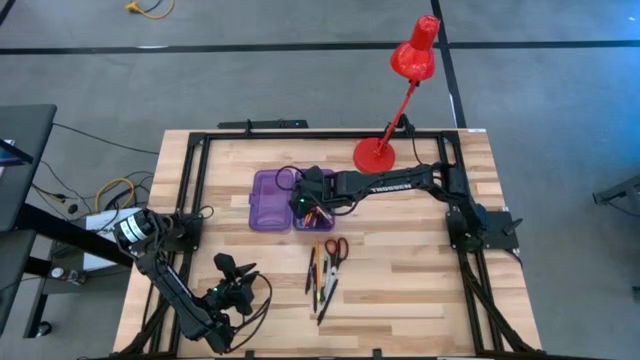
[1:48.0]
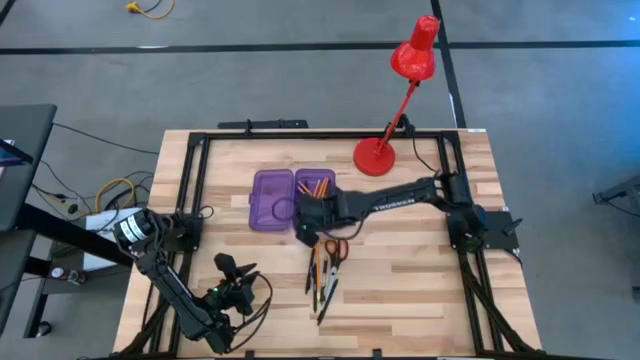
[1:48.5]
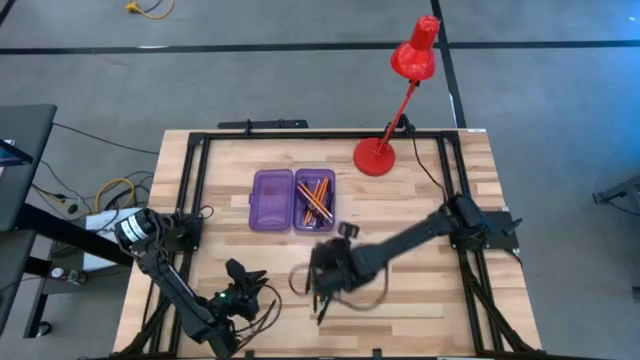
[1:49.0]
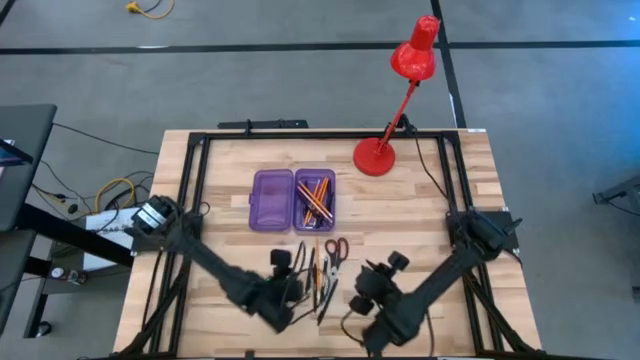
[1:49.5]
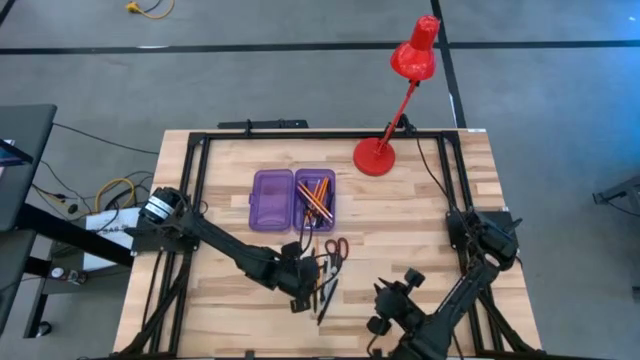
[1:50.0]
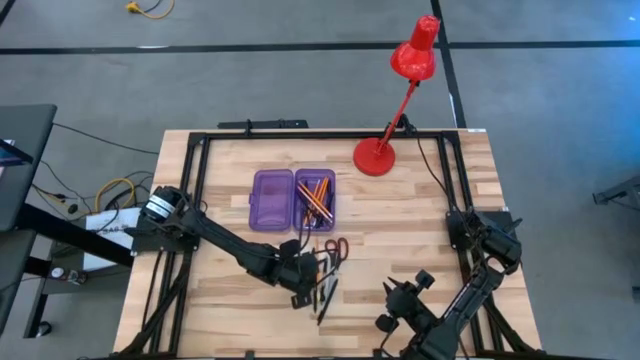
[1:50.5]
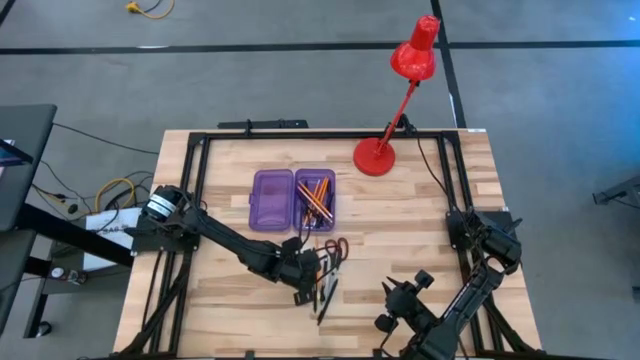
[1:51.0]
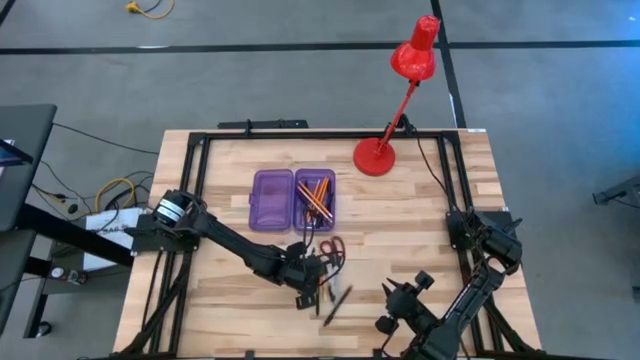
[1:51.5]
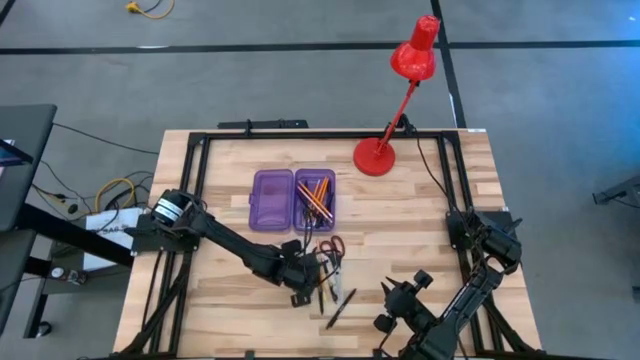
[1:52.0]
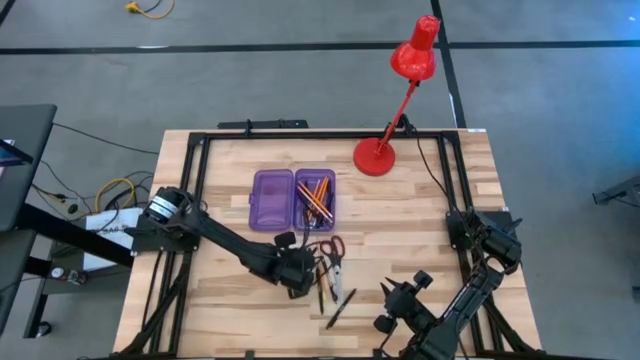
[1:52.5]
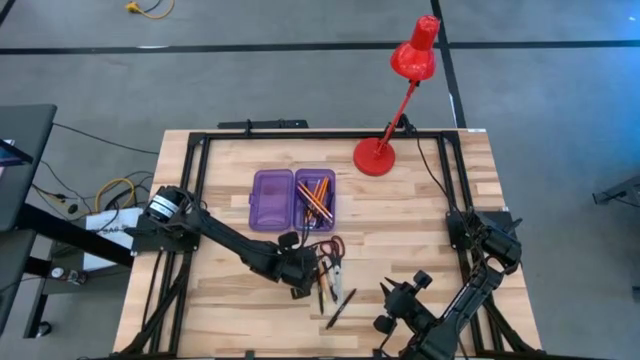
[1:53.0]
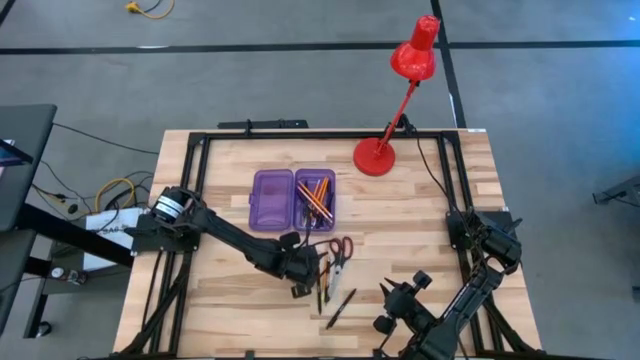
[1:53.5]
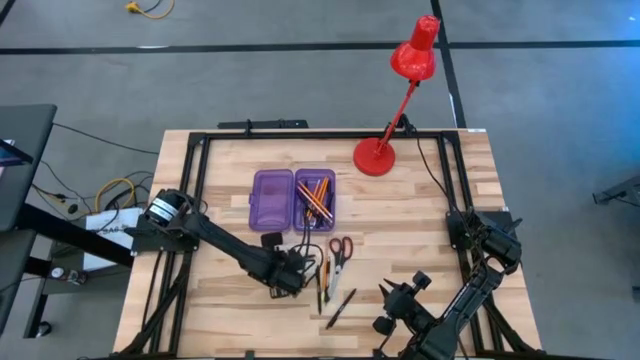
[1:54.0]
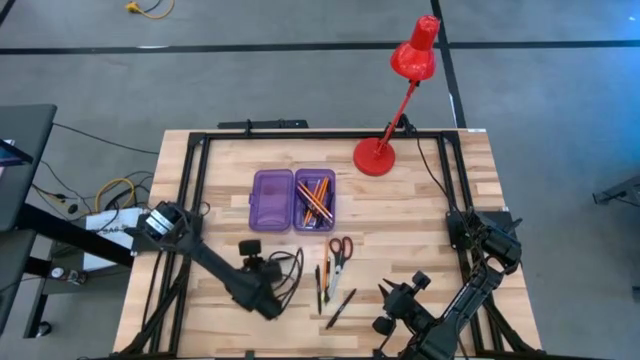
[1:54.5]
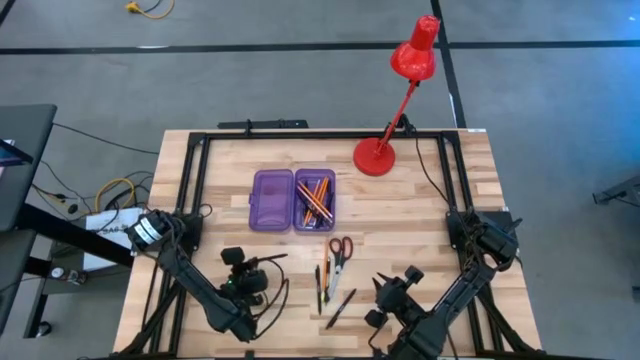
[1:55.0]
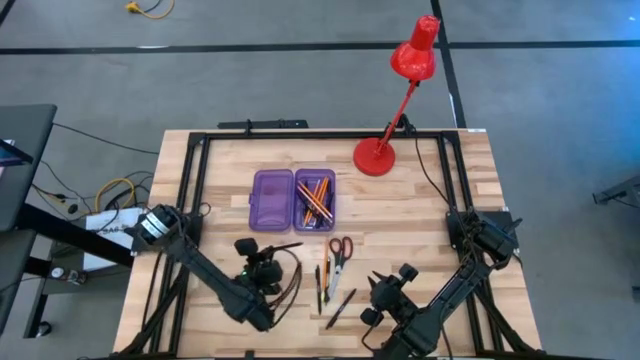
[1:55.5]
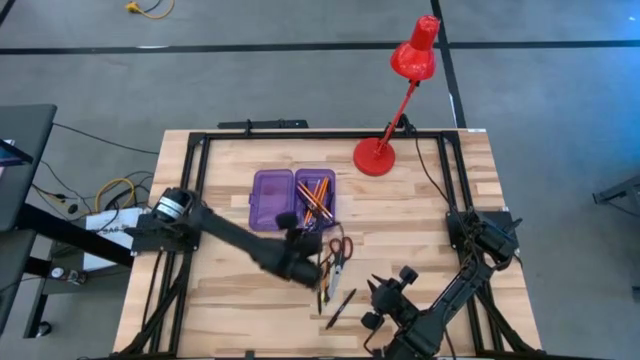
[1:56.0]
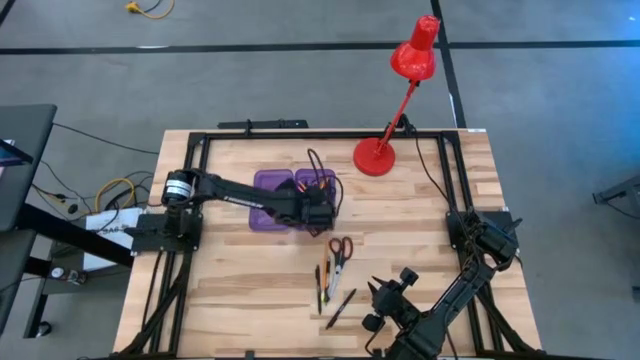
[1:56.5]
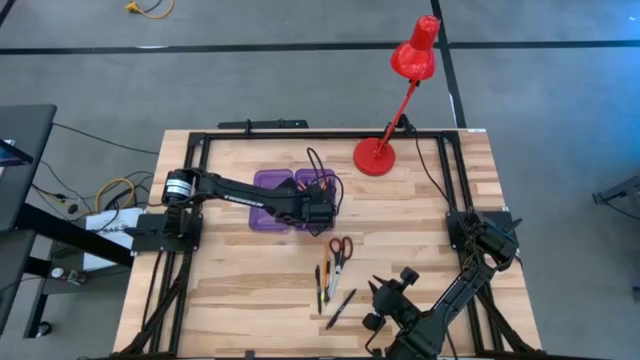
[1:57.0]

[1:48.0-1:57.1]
Task: Pick & place school supplies into a supply box
Put the black pen into the violet supply box

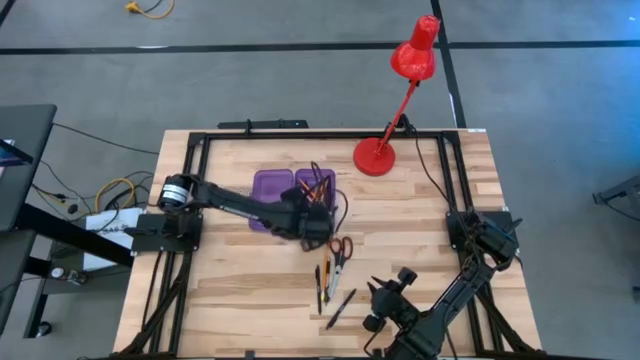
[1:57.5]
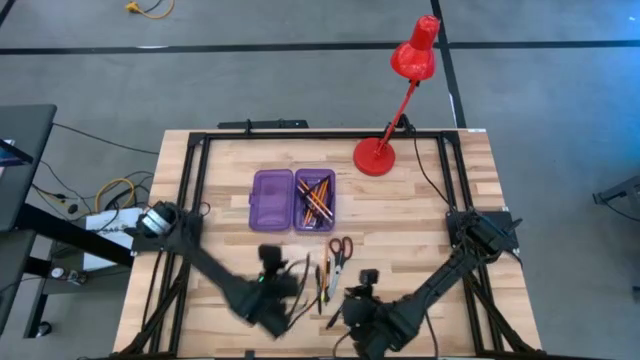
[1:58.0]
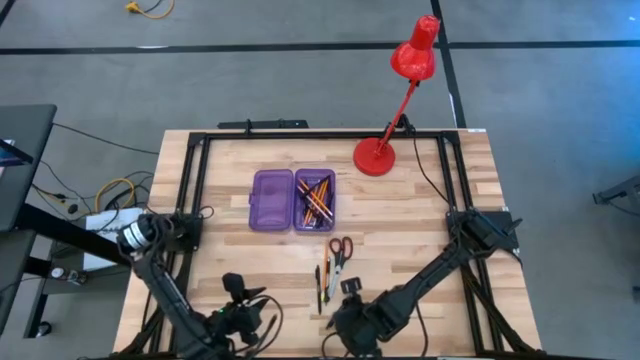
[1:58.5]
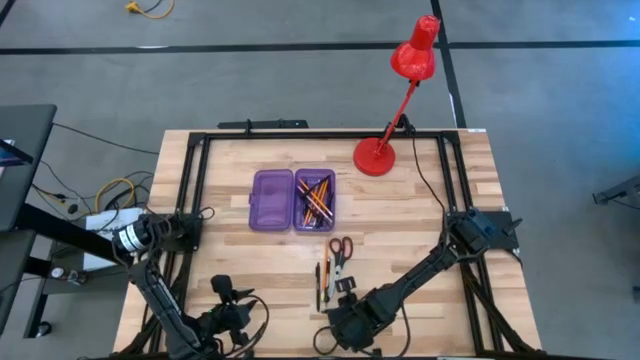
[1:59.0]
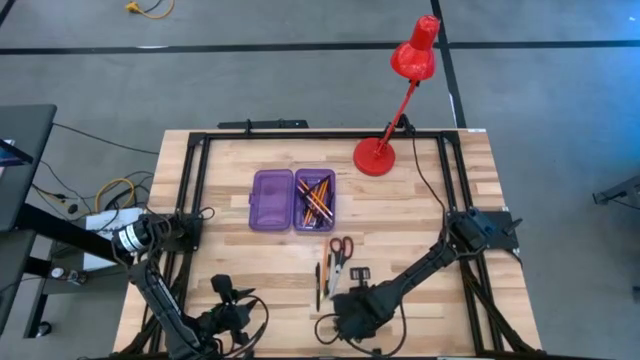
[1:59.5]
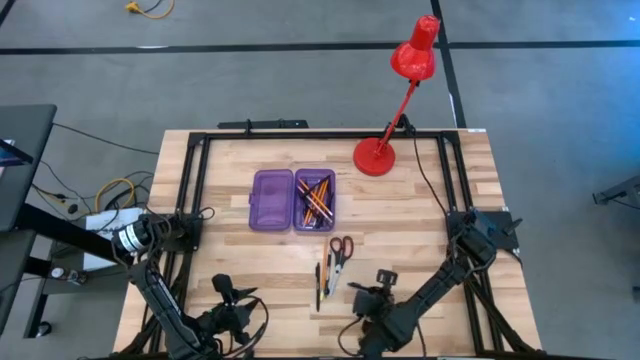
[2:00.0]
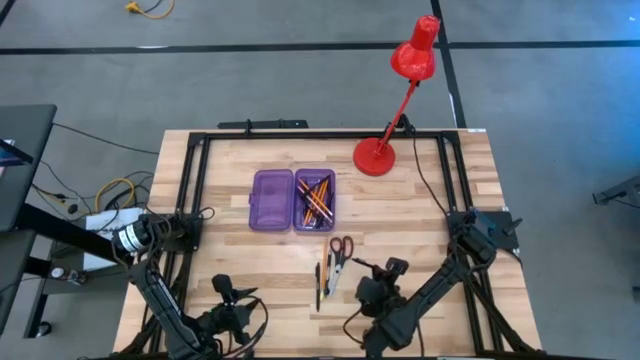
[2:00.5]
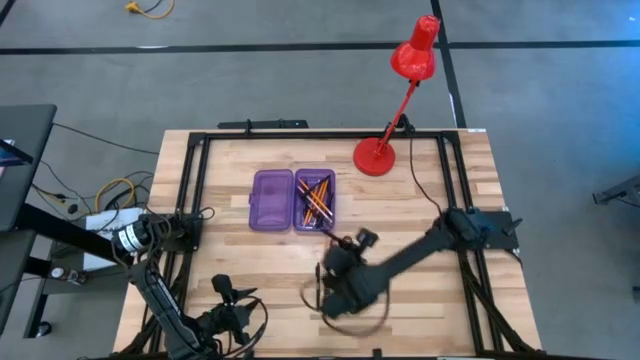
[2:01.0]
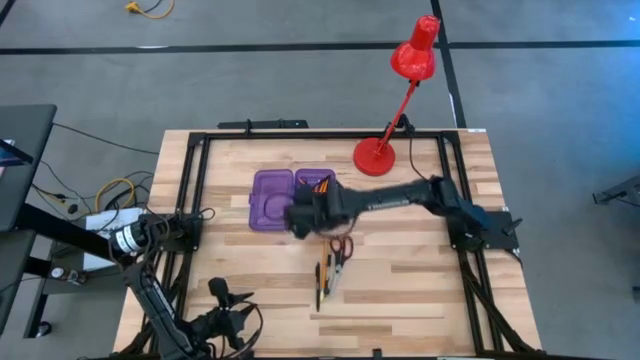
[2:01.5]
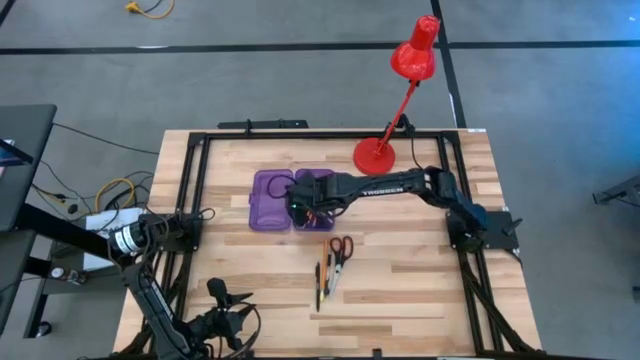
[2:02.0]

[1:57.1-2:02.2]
Put the black pen into the violet supply box

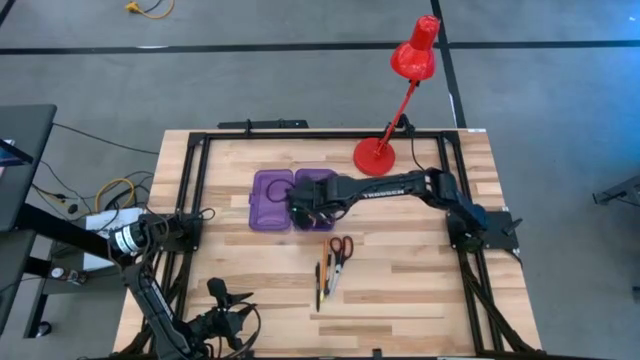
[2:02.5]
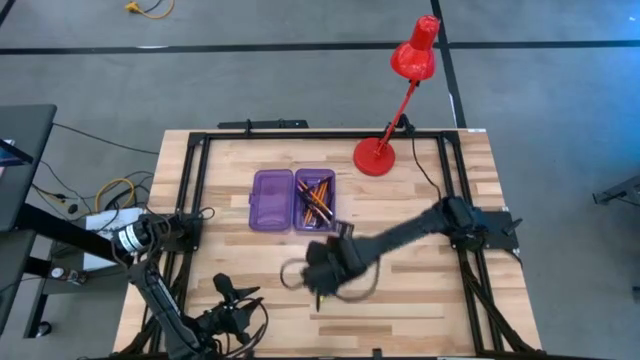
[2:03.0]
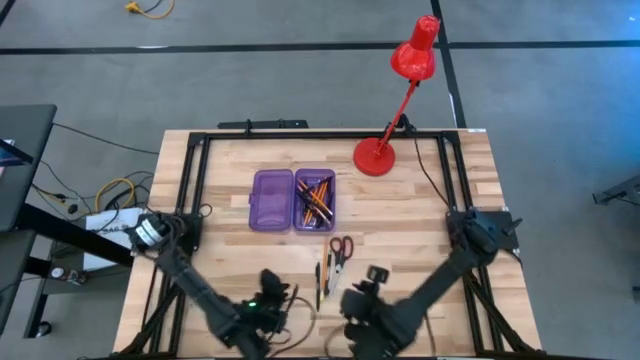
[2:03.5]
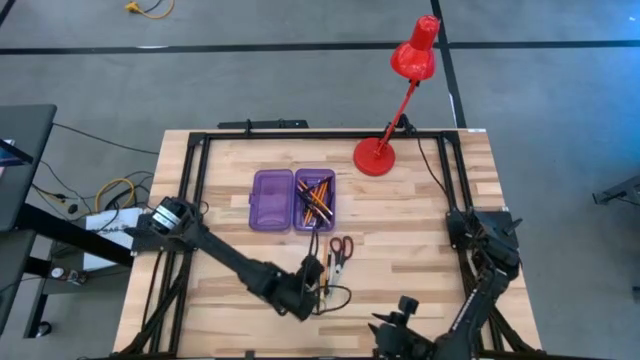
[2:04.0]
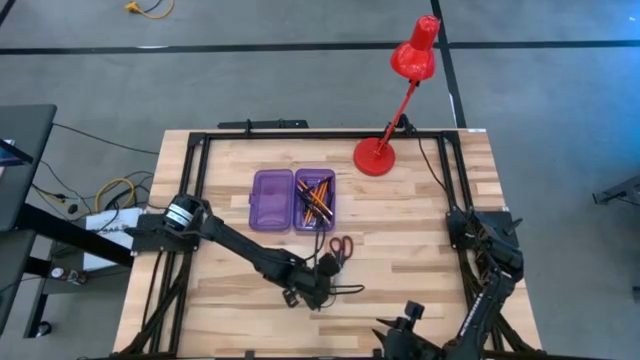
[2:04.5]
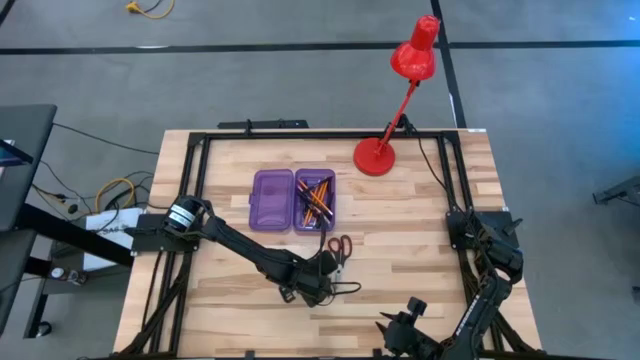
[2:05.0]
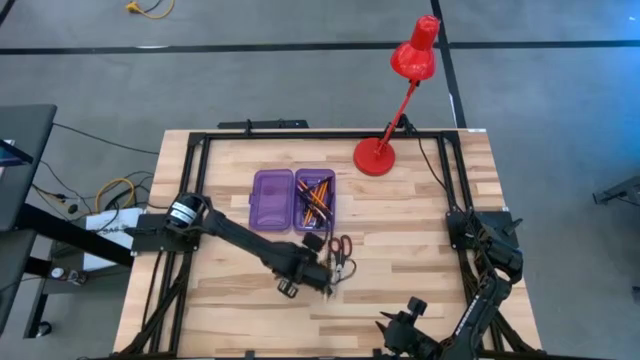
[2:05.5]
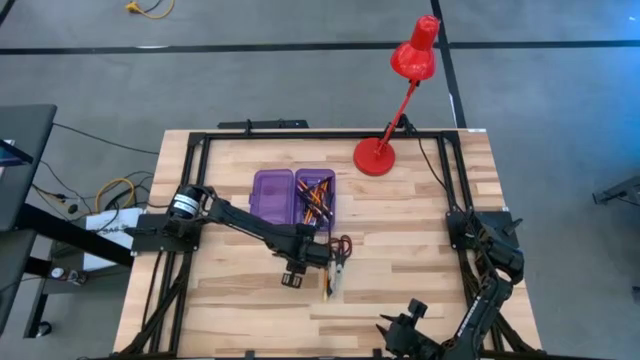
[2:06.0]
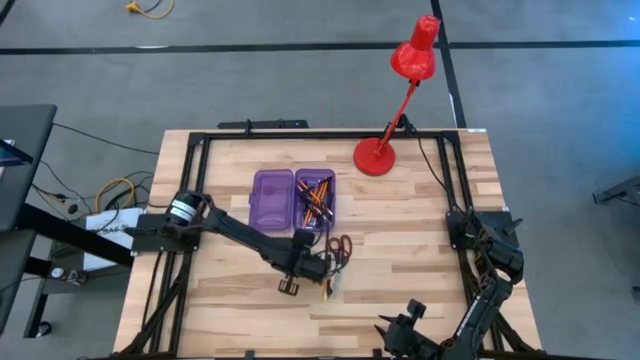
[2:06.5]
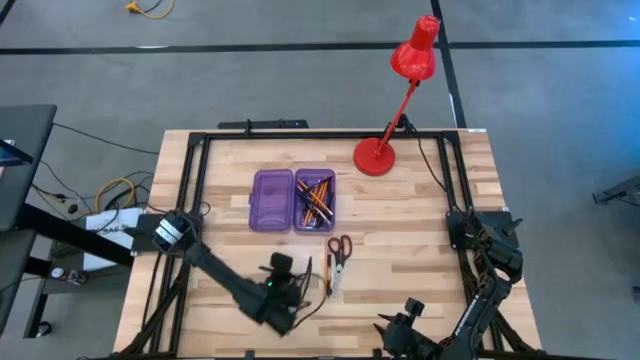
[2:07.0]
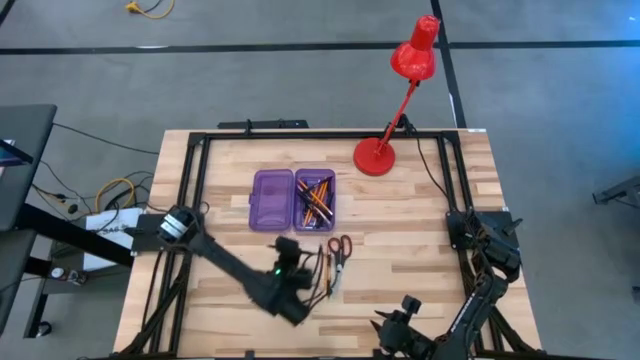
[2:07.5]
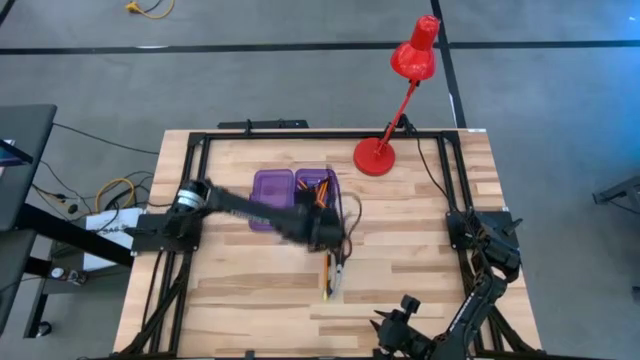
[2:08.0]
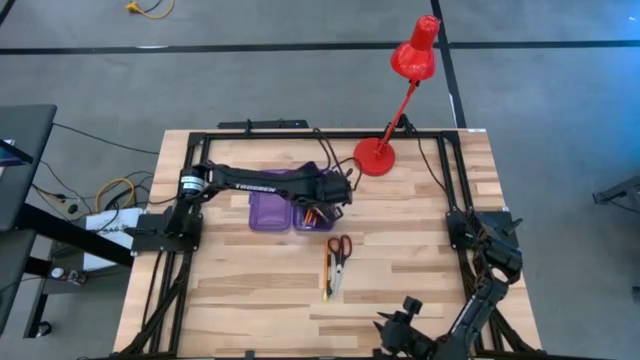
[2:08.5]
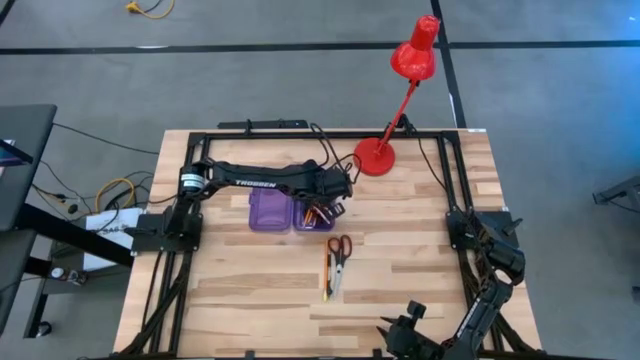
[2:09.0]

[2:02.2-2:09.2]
Put the black pen into the violet supply box
